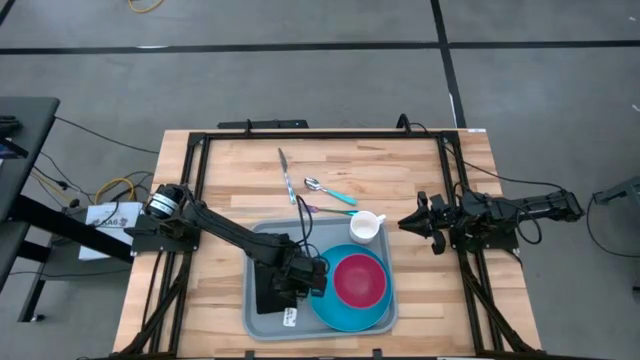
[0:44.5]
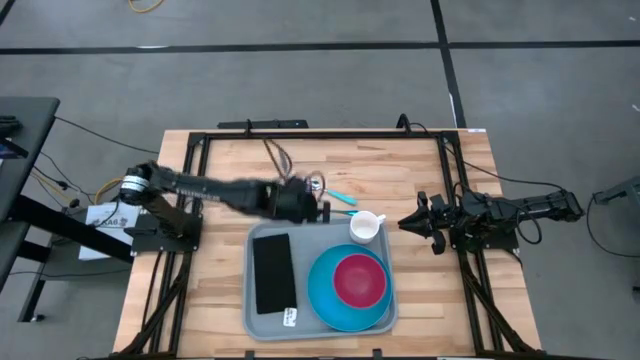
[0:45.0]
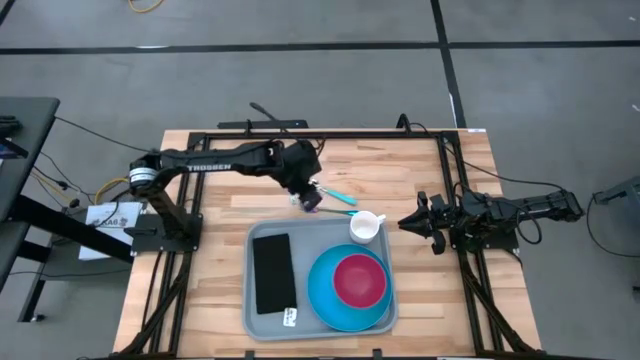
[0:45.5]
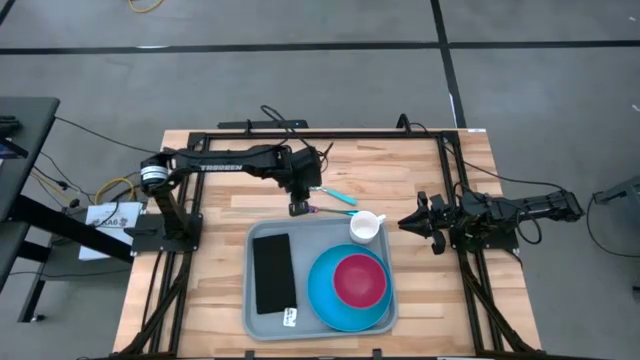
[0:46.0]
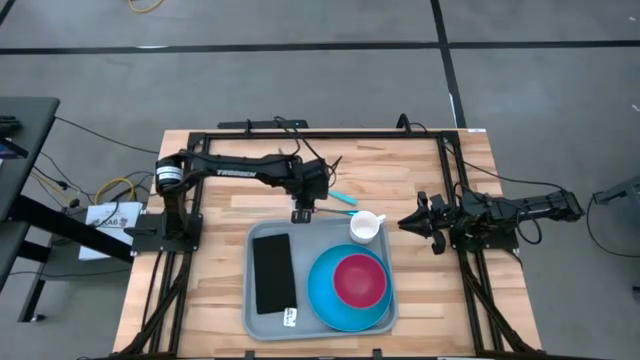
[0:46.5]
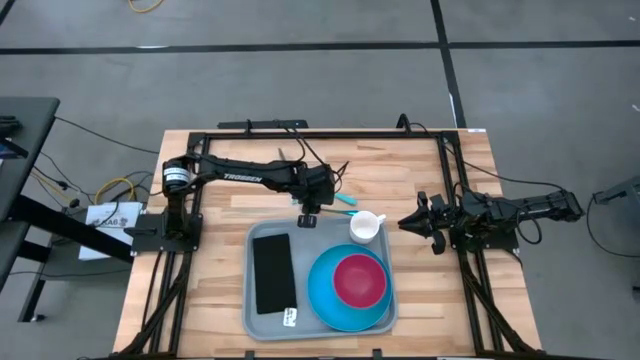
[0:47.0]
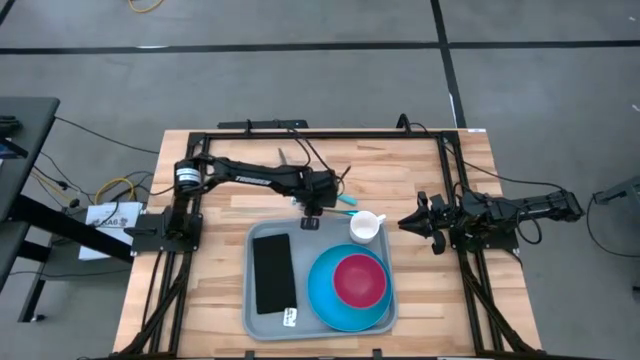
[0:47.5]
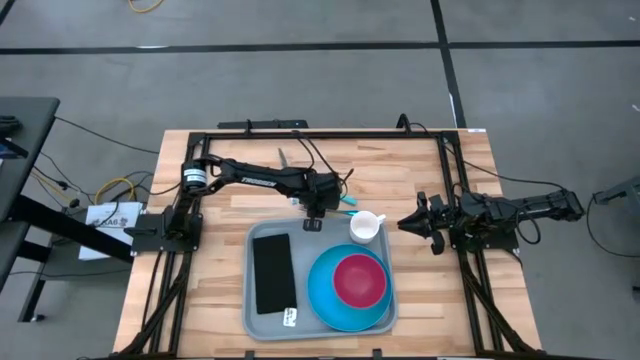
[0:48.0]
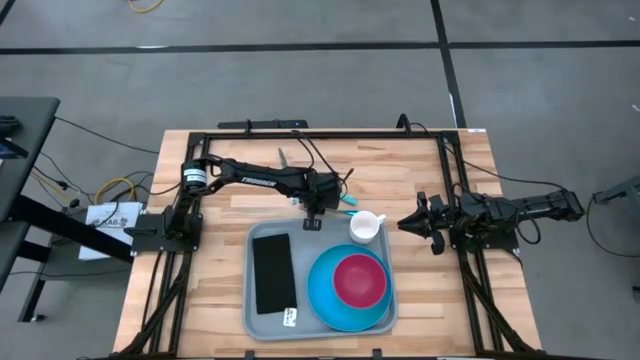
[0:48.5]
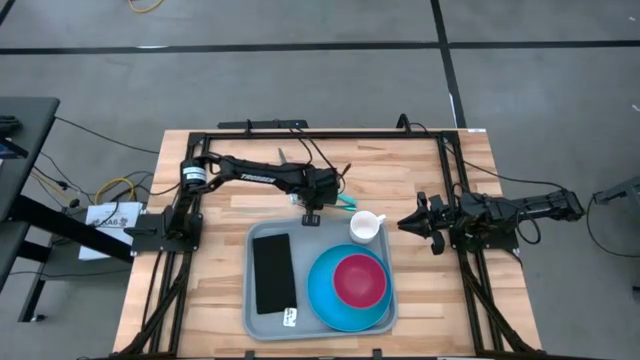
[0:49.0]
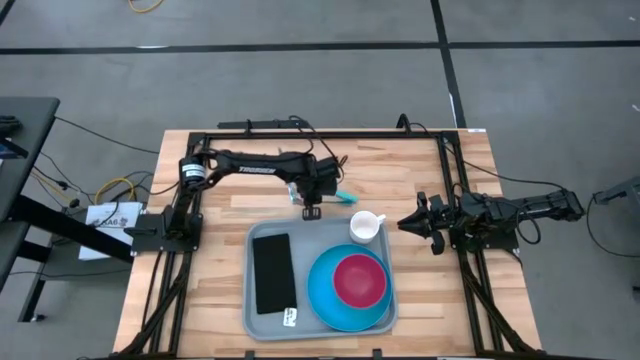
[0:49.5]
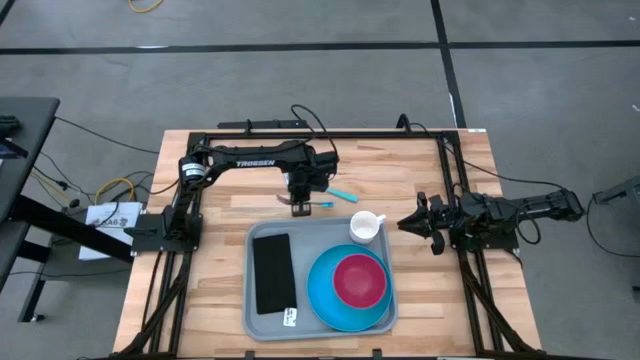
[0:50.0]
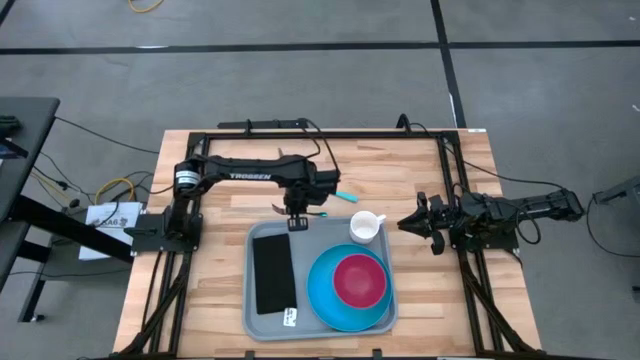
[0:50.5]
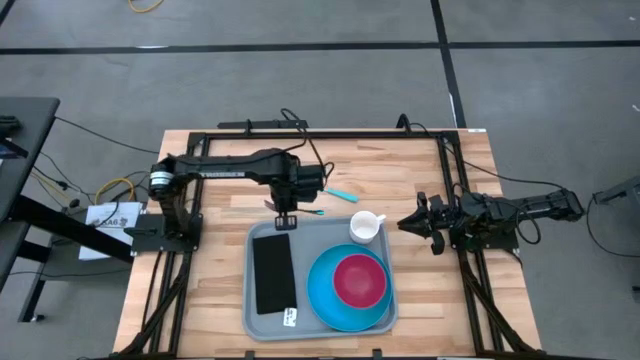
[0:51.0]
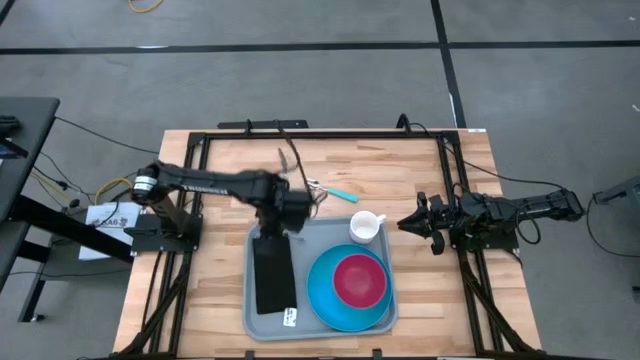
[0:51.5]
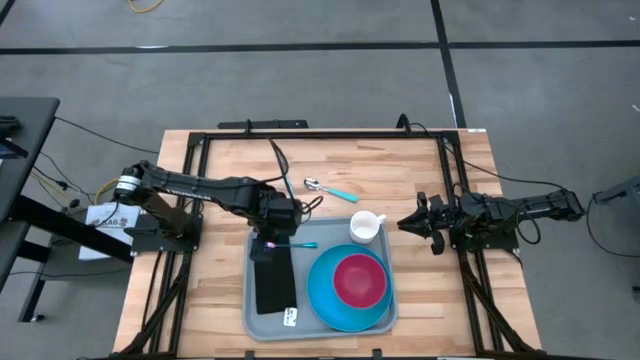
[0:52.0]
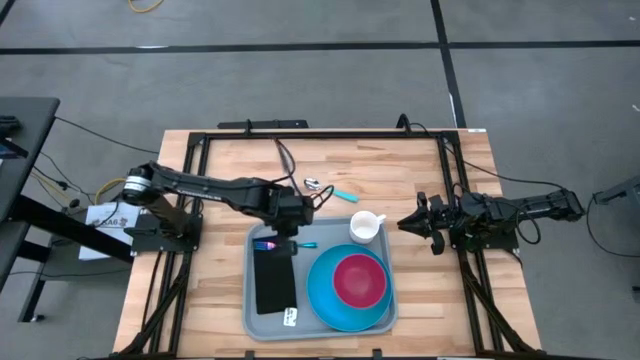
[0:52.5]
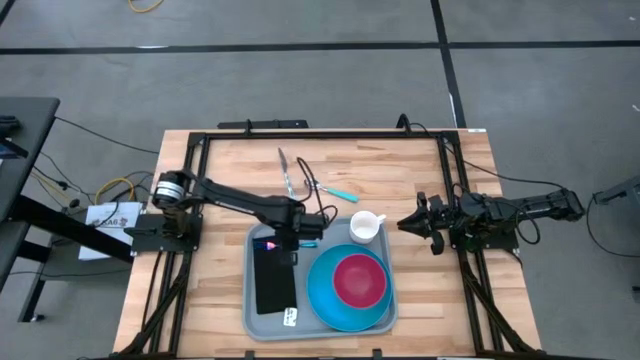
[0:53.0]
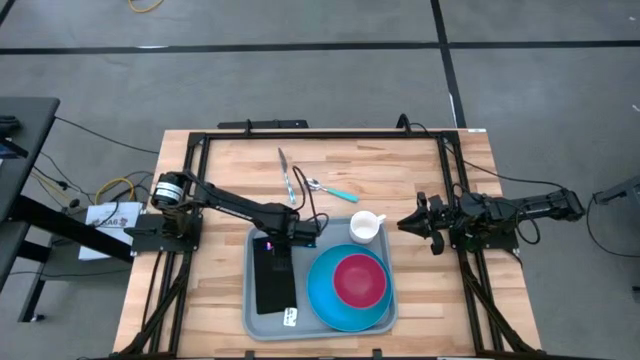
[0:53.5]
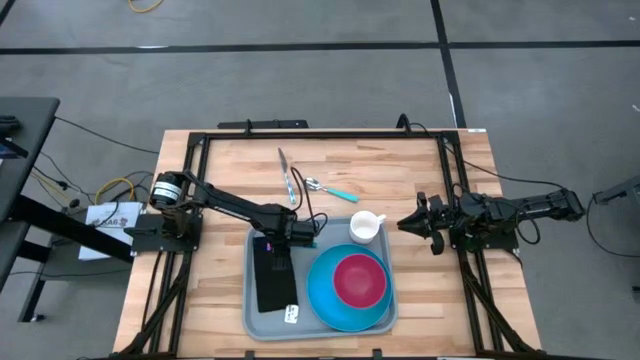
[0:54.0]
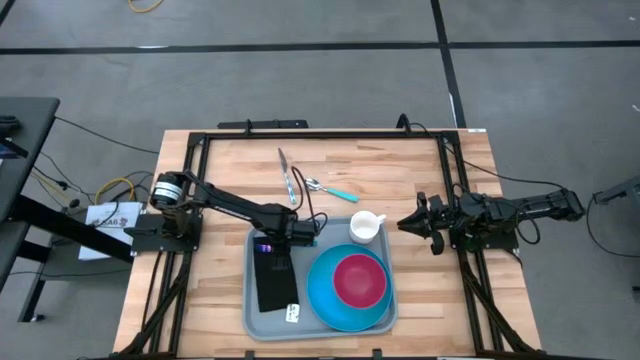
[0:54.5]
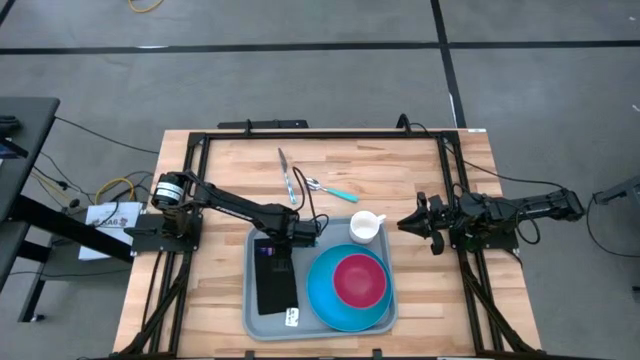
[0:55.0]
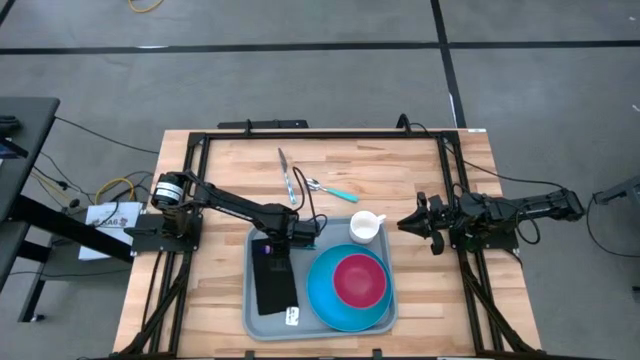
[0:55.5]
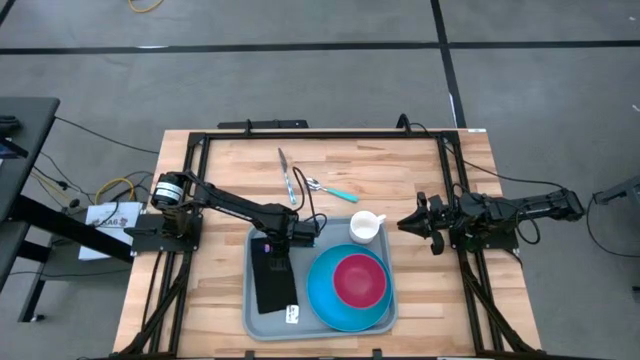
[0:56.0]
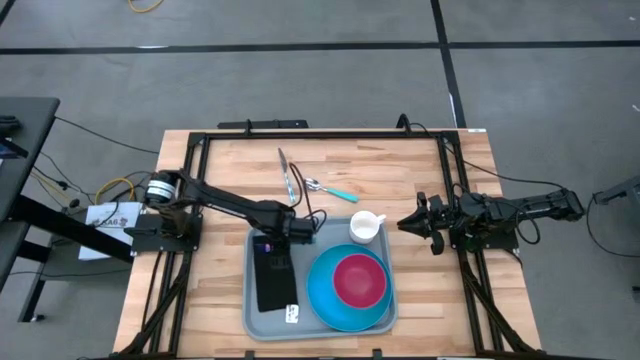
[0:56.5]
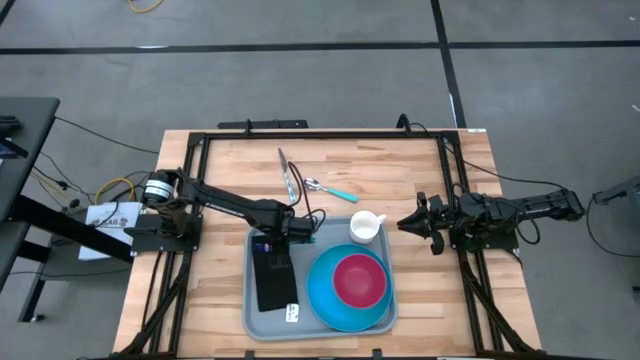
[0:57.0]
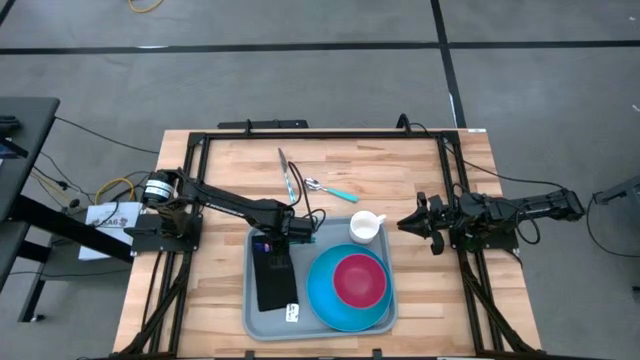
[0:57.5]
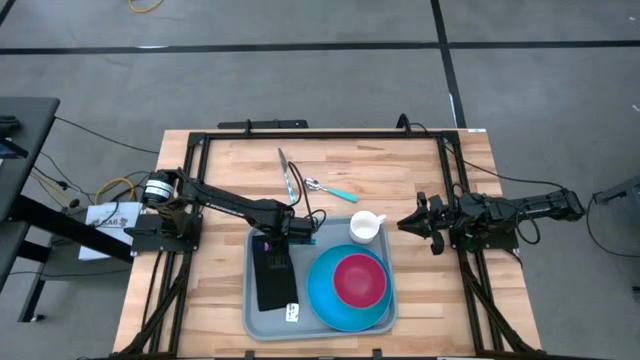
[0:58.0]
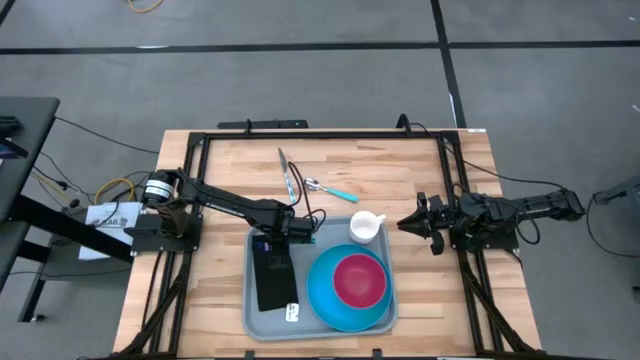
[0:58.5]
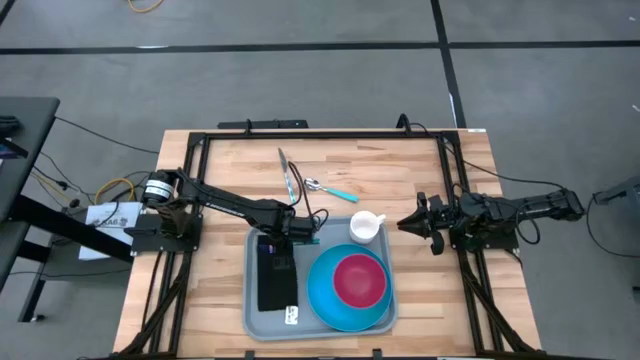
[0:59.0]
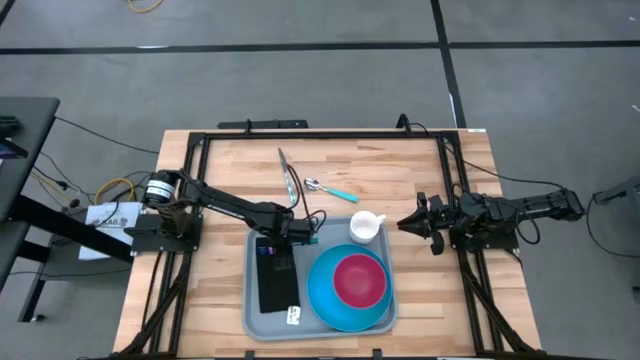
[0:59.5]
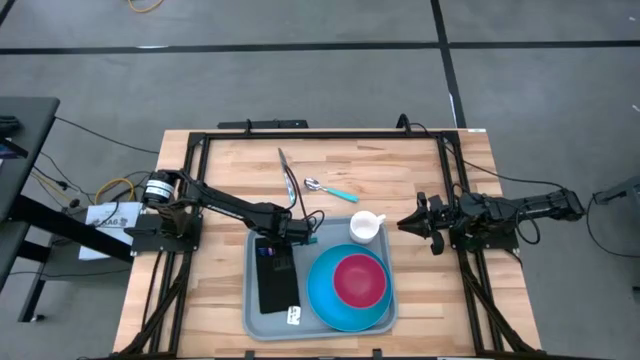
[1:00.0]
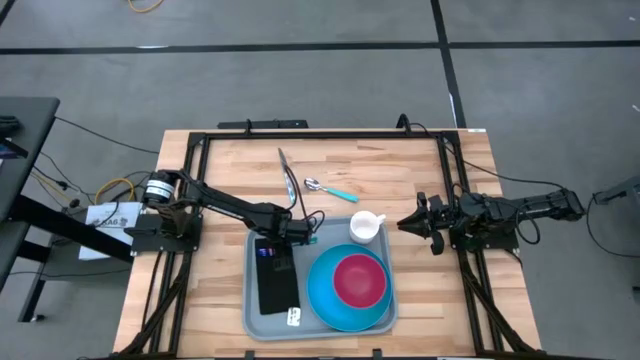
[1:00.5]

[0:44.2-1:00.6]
Task: Set up tray
Put the blue fork on the black napkin

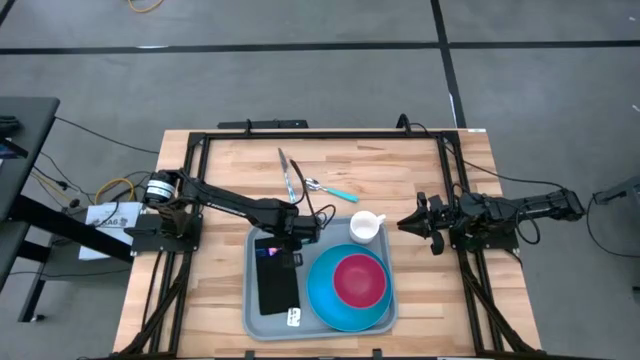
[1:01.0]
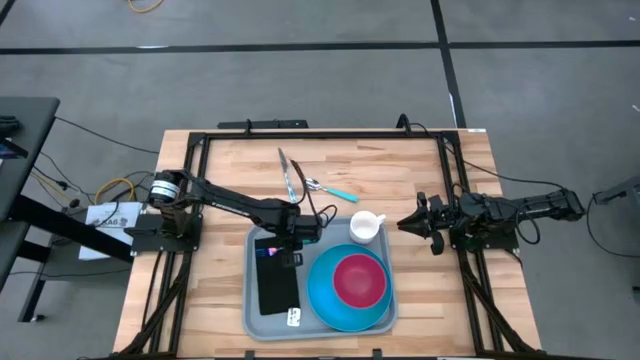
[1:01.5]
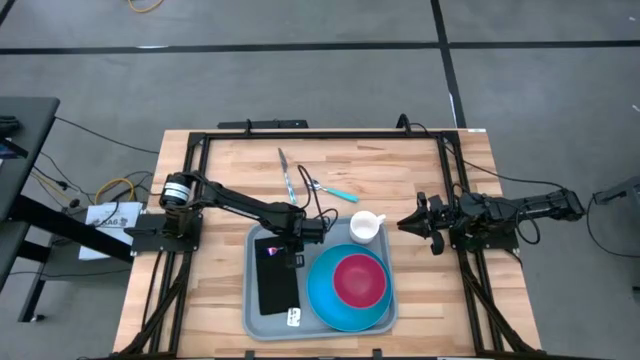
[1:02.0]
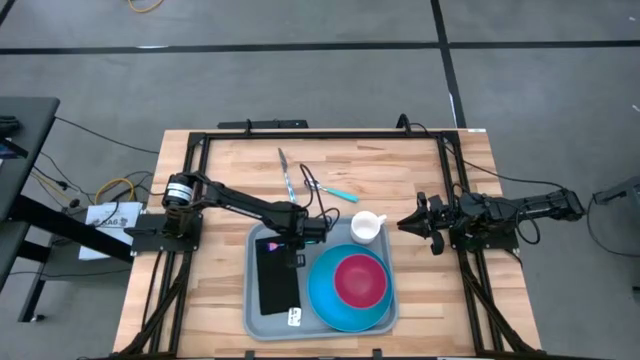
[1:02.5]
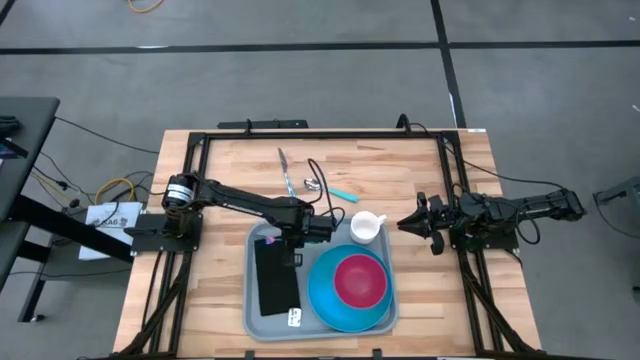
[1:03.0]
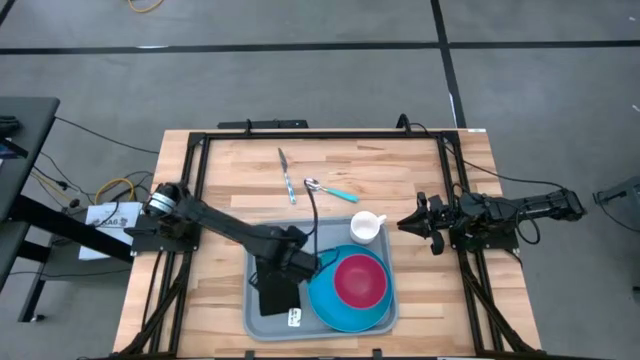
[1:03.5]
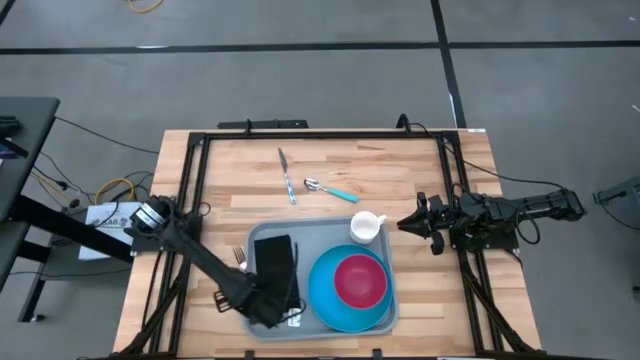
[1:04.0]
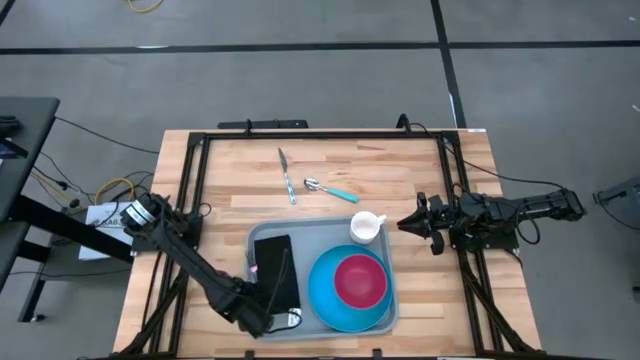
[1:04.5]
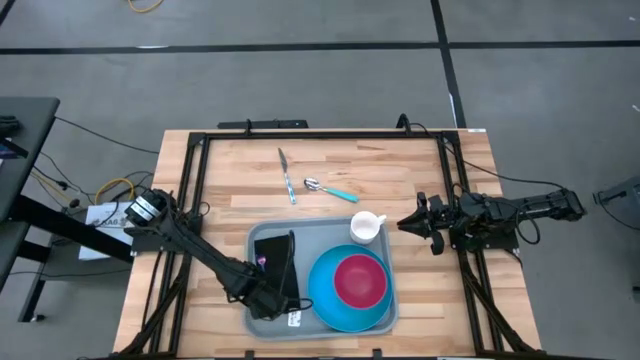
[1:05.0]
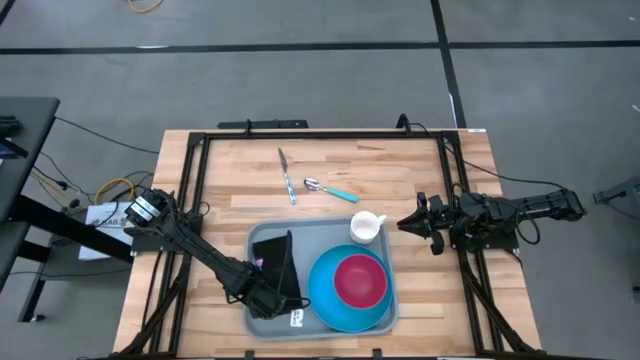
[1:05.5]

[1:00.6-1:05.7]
Put the blue fork on the black napkin
